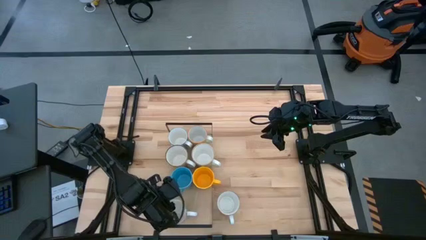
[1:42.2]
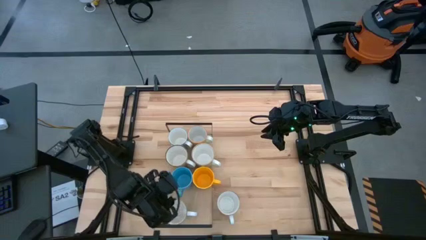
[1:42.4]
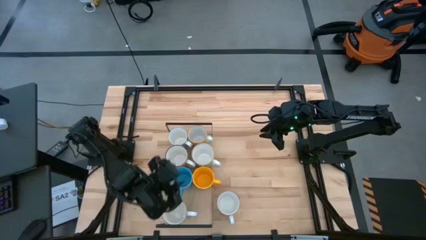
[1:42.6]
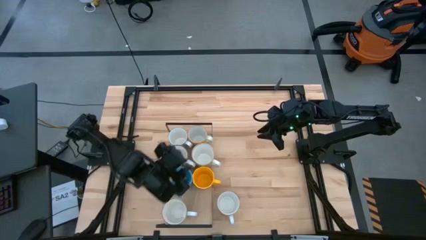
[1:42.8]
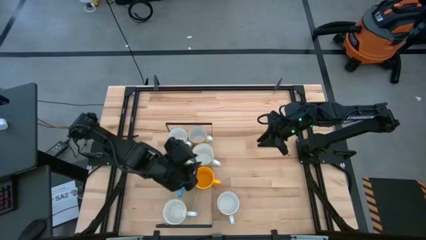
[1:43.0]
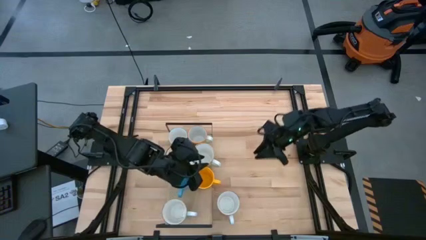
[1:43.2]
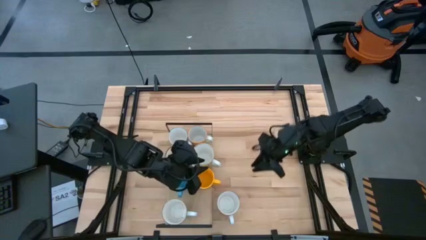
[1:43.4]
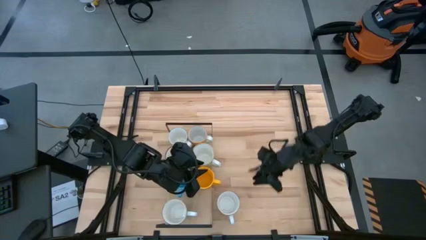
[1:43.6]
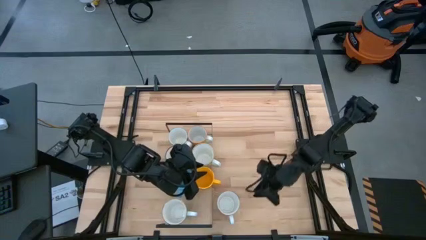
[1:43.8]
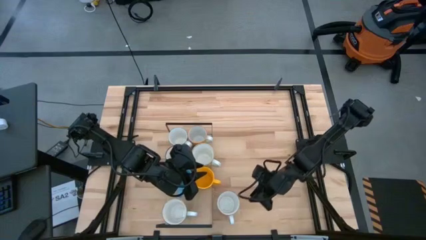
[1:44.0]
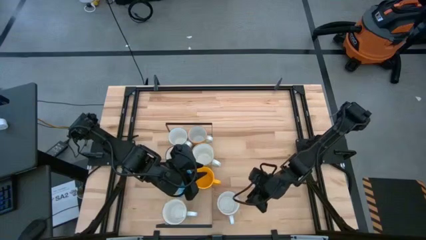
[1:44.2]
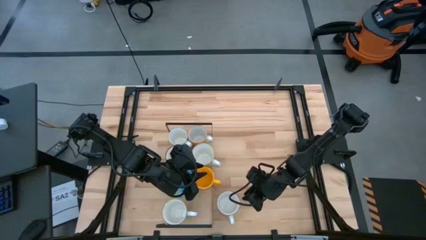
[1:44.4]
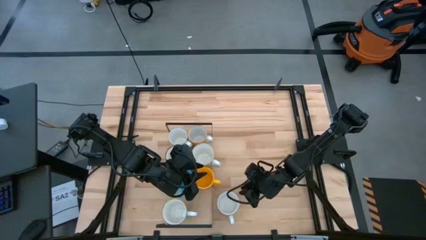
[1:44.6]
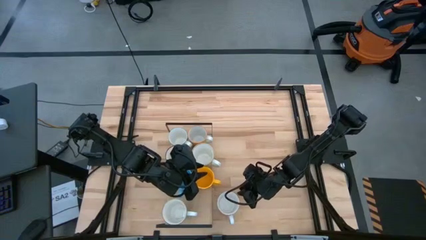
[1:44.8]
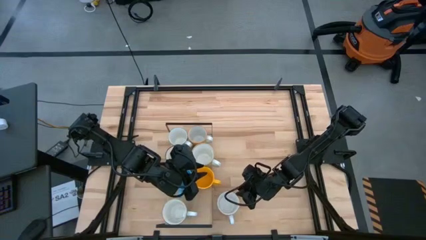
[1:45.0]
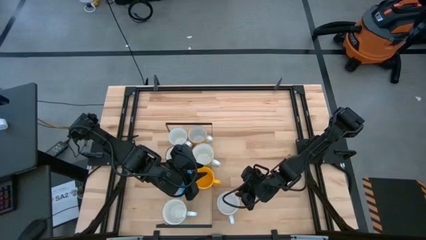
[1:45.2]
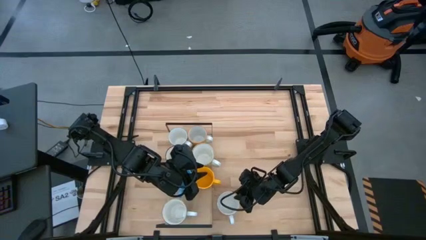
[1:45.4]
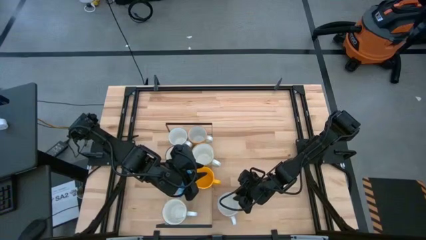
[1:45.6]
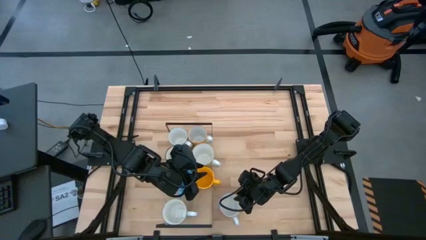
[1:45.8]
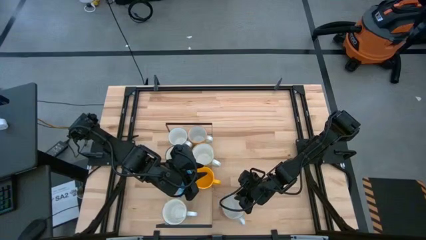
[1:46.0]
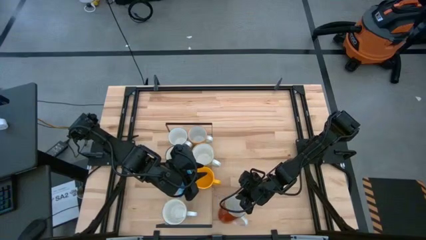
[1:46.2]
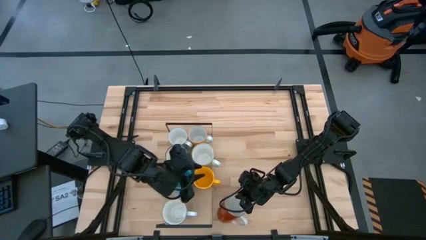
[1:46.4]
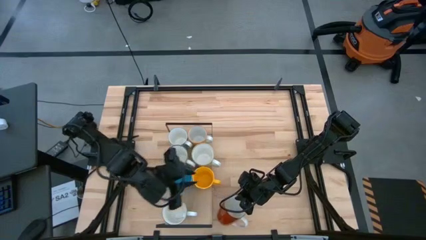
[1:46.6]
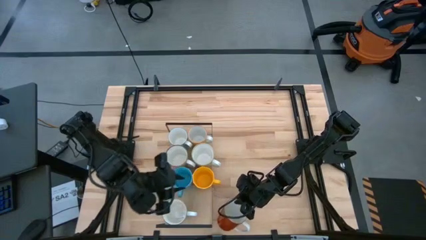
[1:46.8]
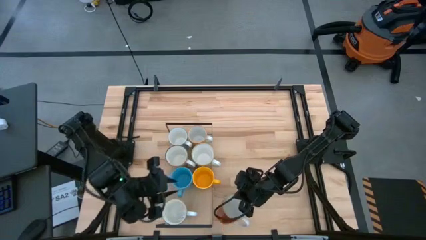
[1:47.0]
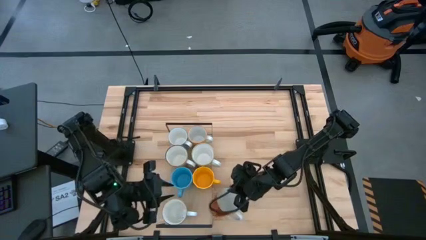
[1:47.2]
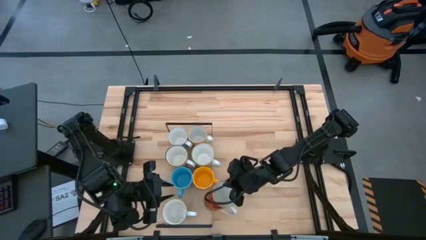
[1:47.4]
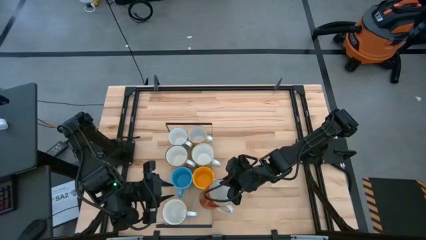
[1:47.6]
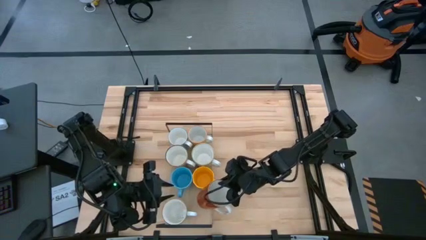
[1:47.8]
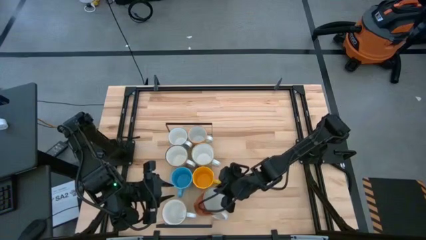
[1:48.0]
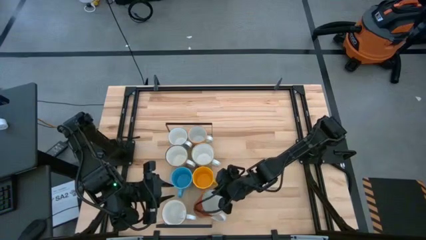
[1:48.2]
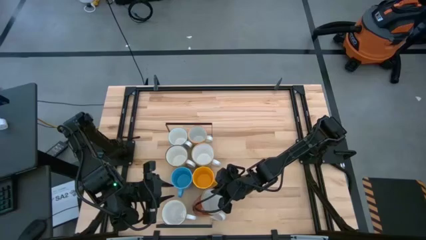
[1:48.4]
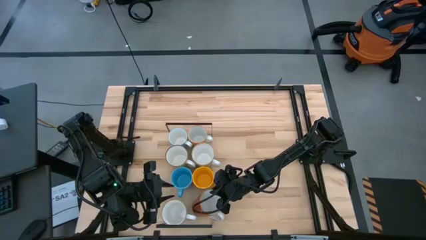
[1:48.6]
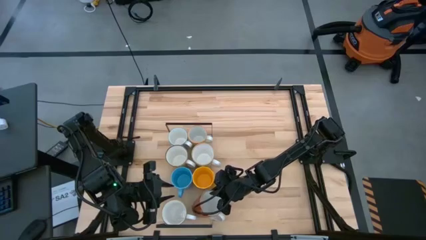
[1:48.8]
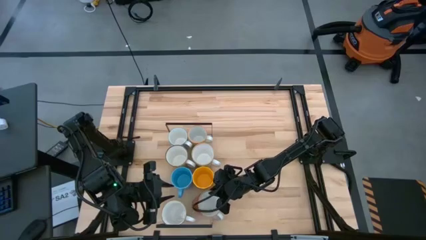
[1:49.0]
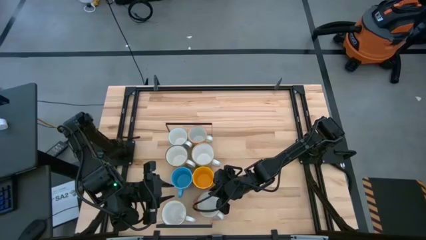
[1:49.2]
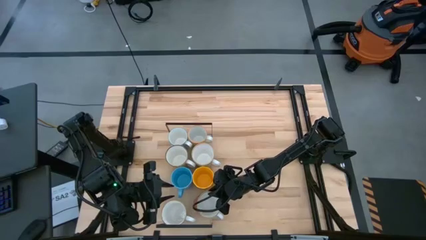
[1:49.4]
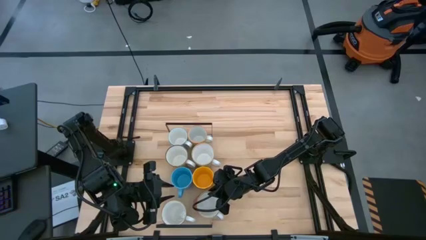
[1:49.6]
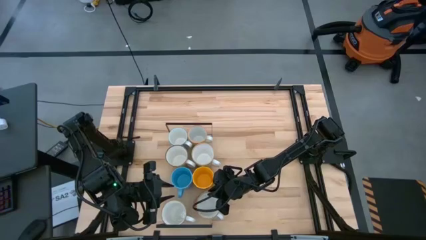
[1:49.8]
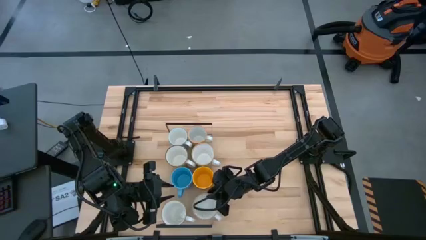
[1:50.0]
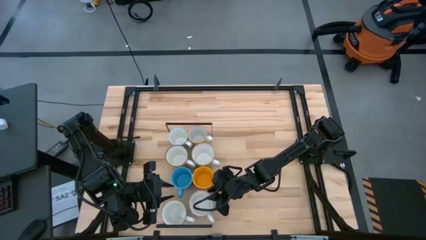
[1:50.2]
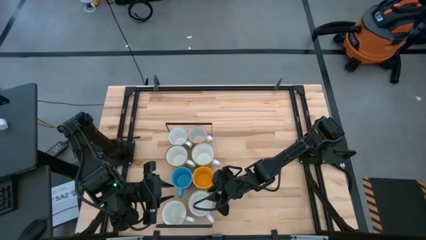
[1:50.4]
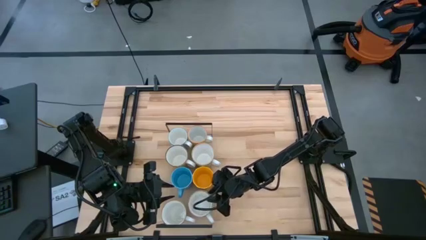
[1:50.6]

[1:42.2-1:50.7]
Task: Place coffee mugs
Put the orange mug on the shelf

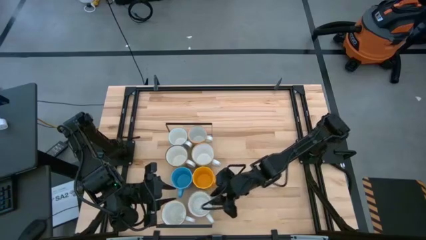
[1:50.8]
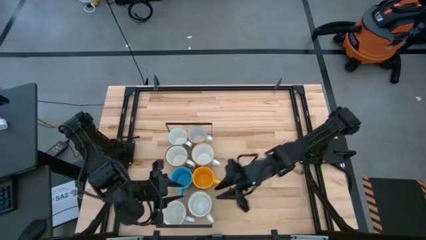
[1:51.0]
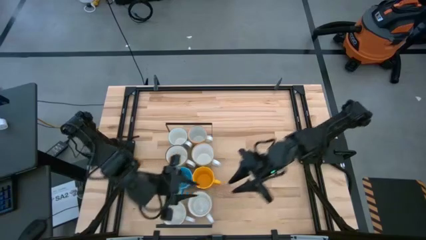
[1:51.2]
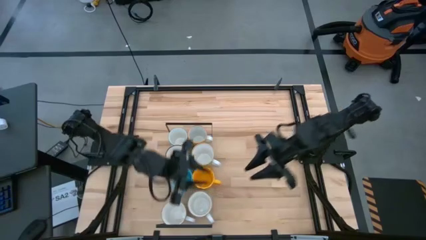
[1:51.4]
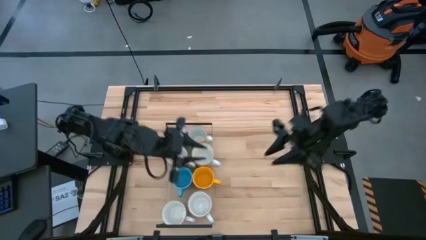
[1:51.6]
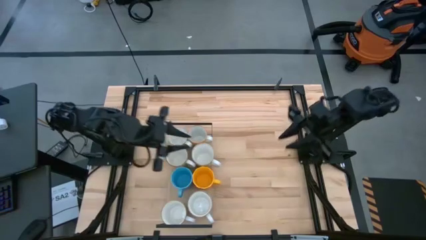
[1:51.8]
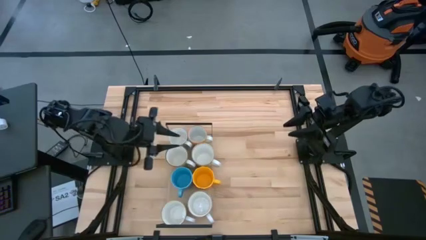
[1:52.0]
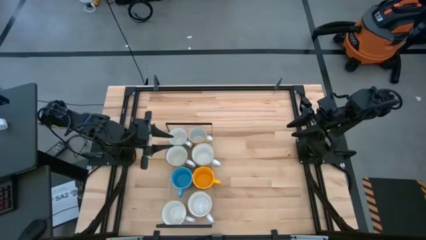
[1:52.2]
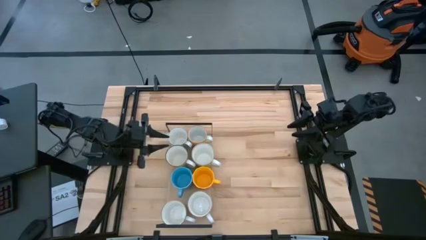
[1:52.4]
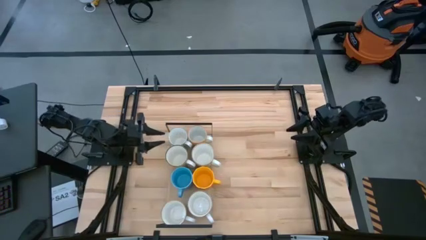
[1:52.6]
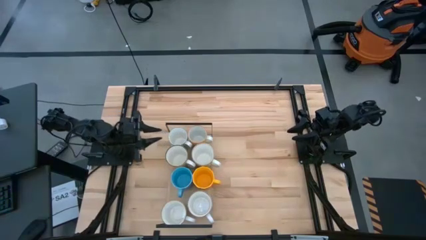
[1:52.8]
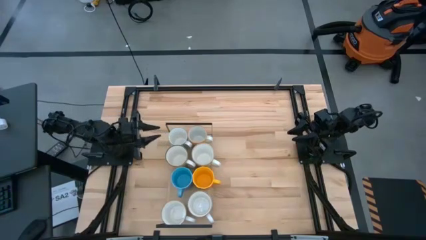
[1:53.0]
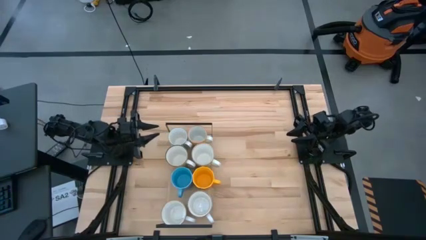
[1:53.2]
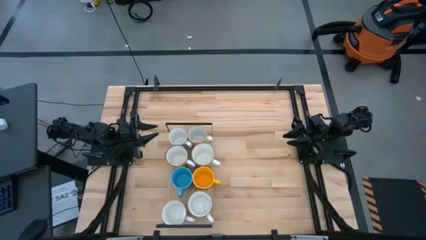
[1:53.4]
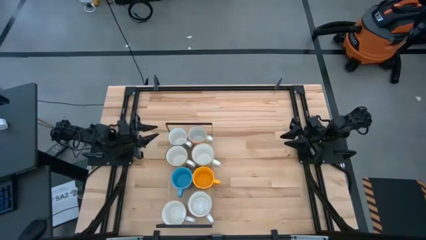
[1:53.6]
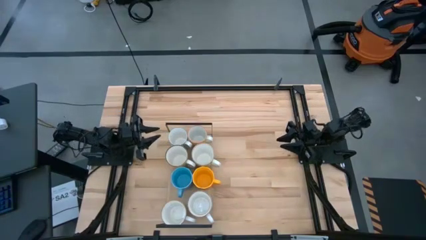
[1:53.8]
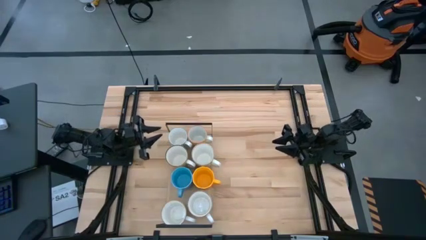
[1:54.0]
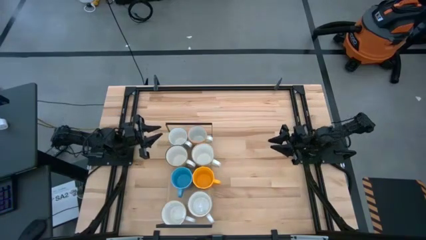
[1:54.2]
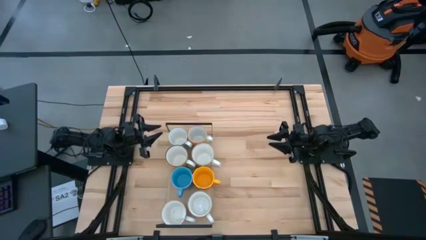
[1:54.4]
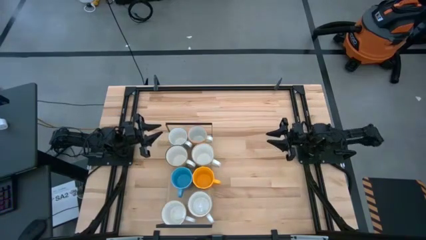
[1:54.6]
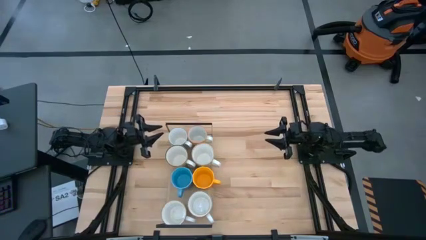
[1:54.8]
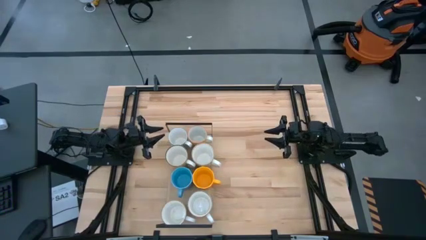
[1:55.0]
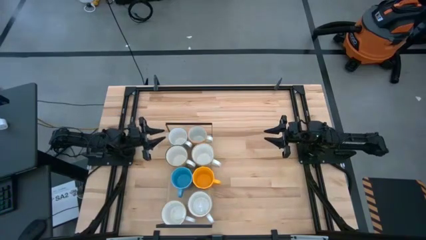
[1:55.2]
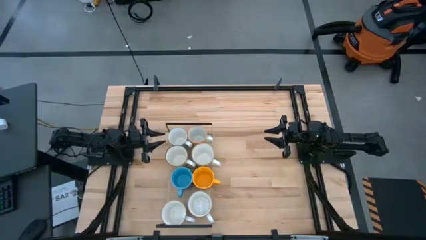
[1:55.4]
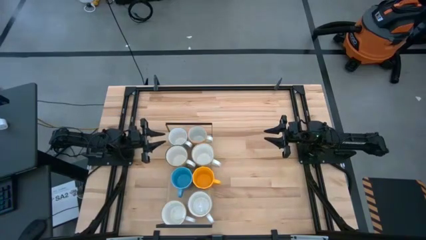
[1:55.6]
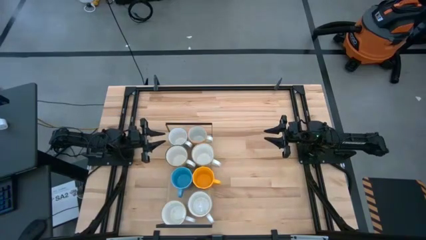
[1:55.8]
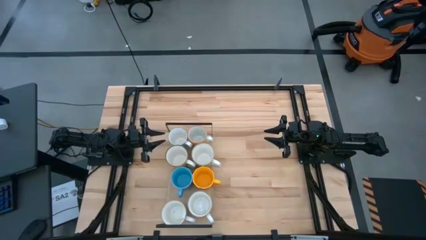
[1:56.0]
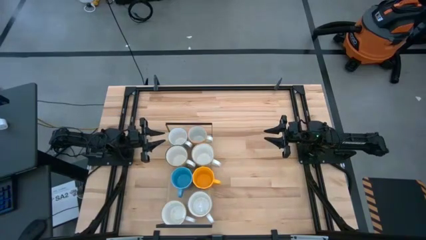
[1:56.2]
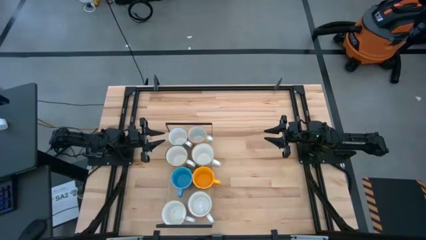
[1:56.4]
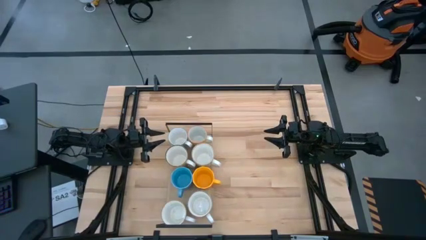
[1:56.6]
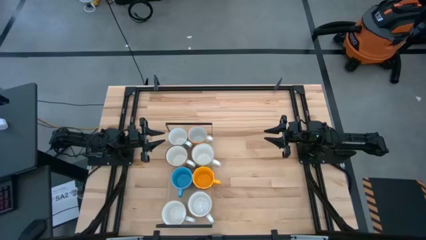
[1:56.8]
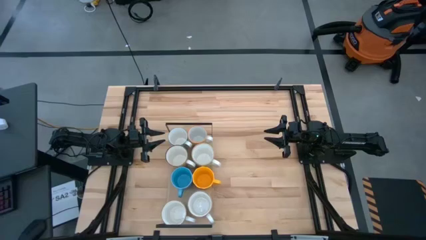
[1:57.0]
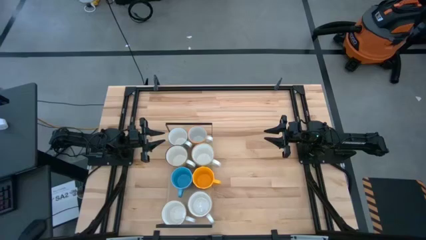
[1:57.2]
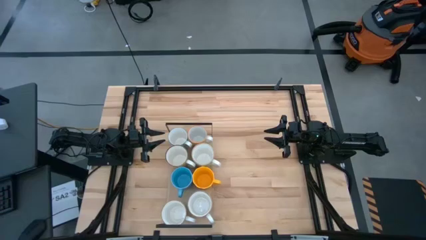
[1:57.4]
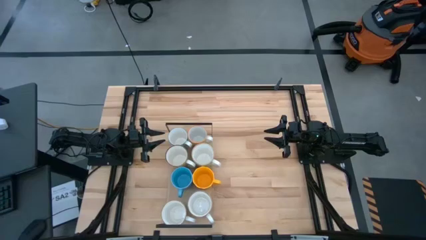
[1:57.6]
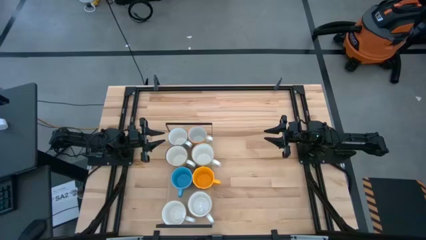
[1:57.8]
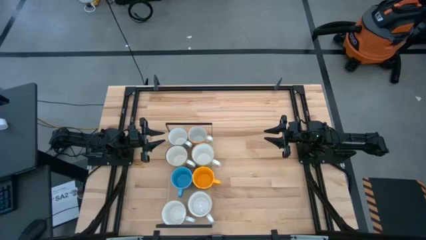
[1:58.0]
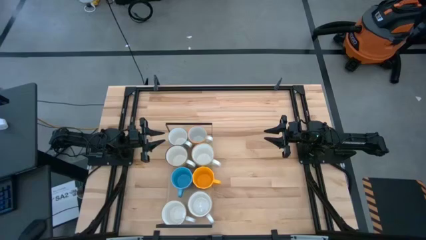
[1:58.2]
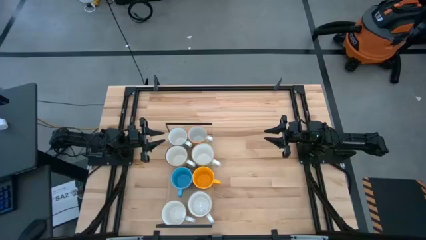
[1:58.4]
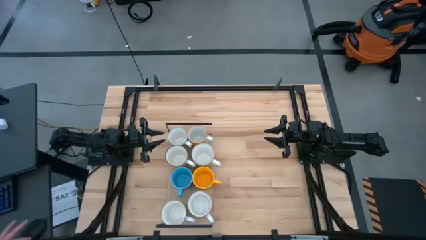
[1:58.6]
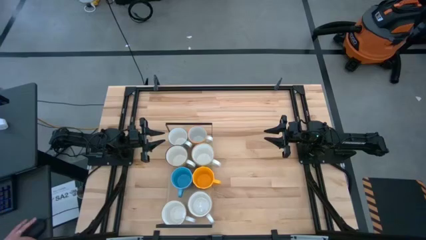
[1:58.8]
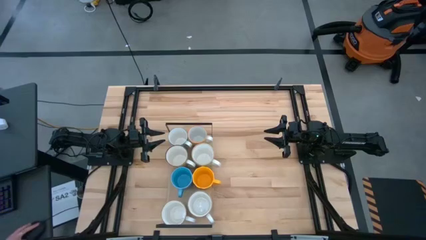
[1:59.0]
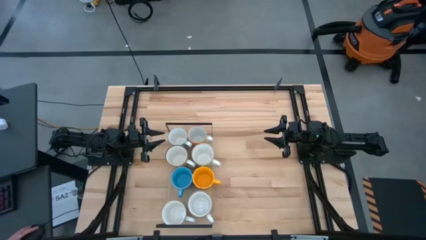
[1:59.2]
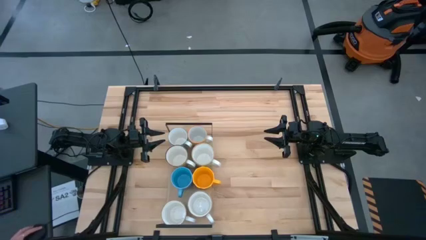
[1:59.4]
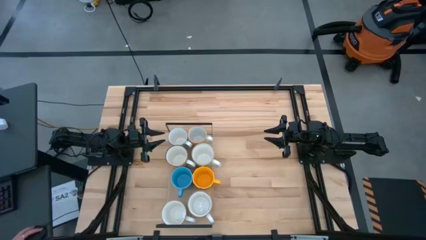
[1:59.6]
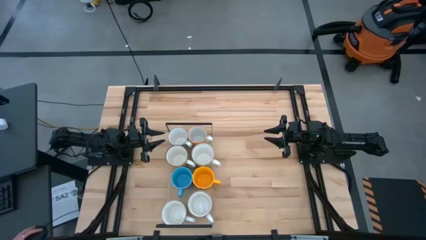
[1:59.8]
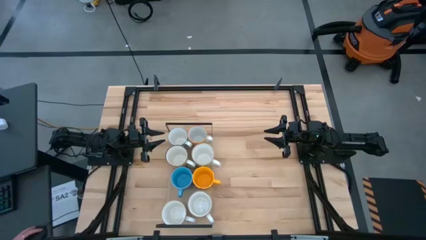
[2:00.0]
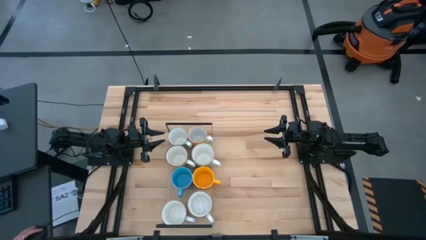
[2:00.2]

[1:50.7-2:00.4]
Return to Home Position
